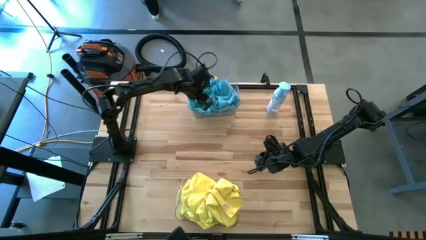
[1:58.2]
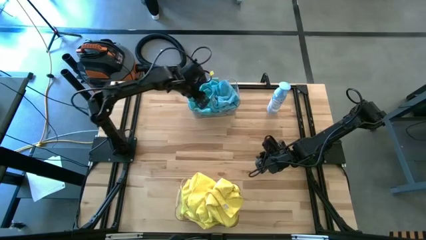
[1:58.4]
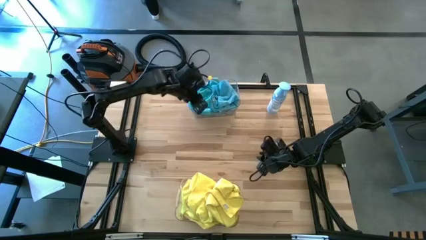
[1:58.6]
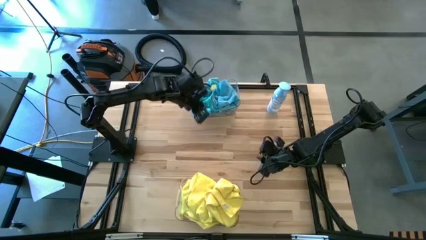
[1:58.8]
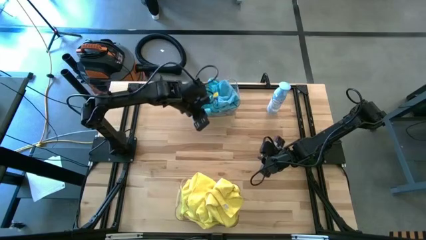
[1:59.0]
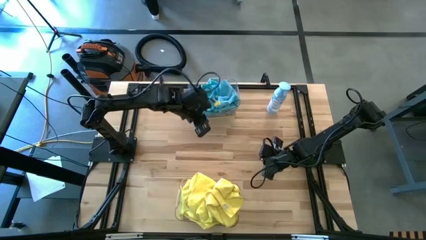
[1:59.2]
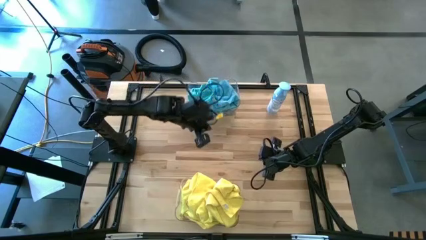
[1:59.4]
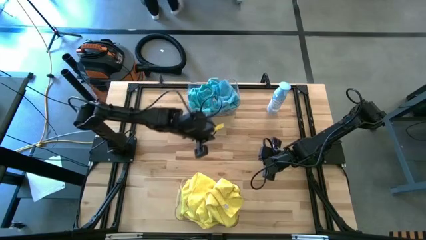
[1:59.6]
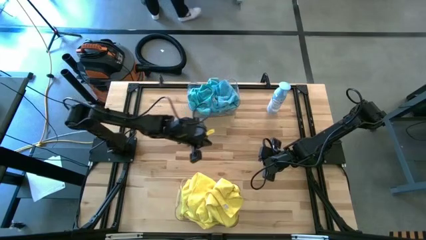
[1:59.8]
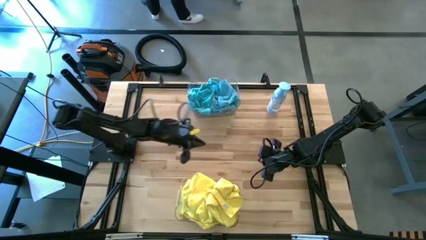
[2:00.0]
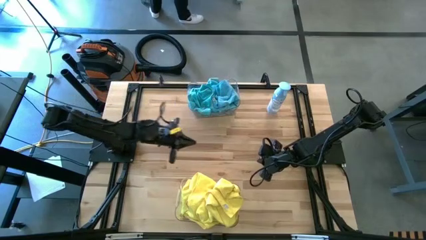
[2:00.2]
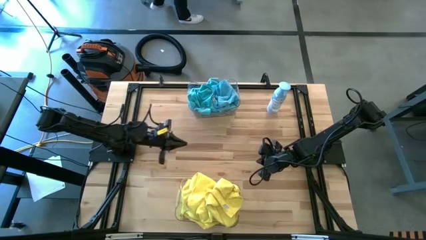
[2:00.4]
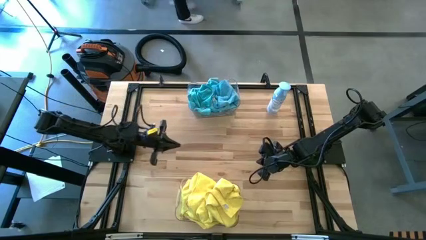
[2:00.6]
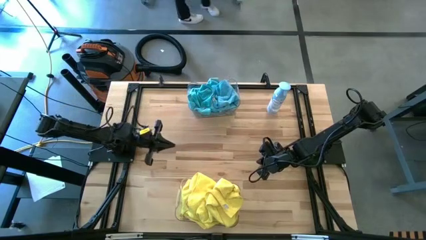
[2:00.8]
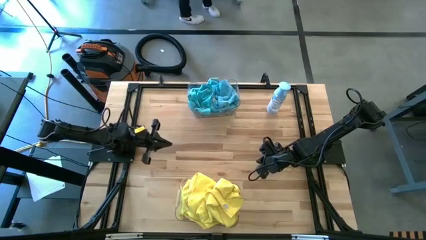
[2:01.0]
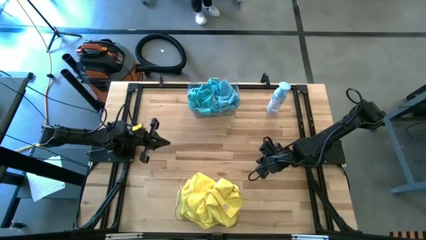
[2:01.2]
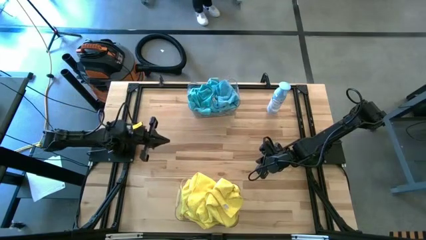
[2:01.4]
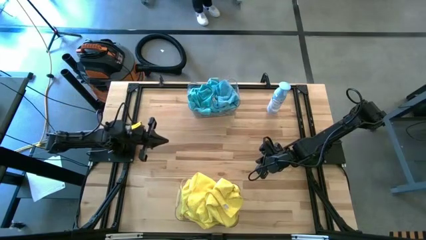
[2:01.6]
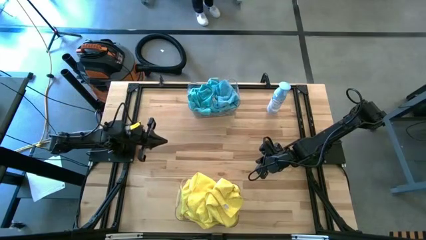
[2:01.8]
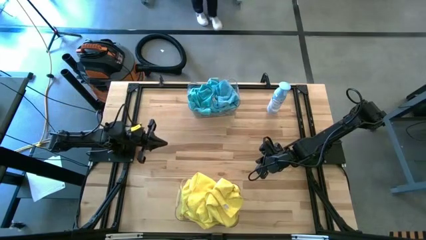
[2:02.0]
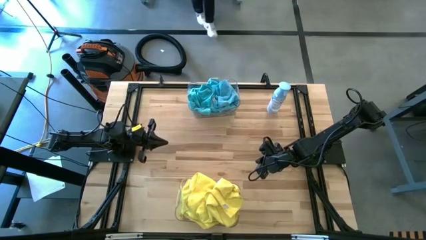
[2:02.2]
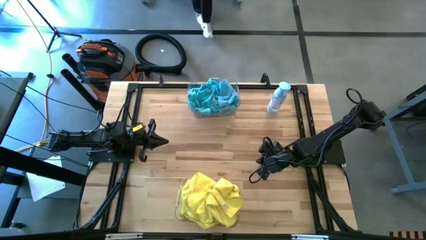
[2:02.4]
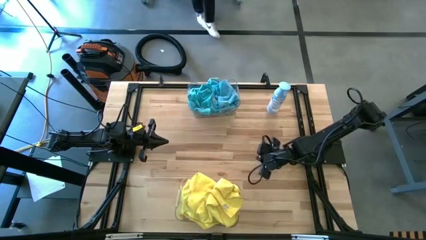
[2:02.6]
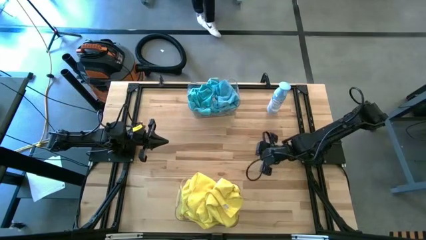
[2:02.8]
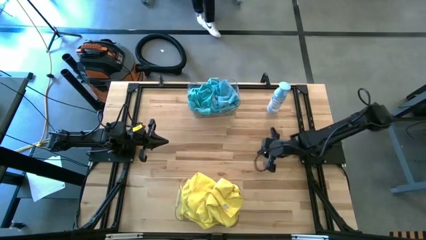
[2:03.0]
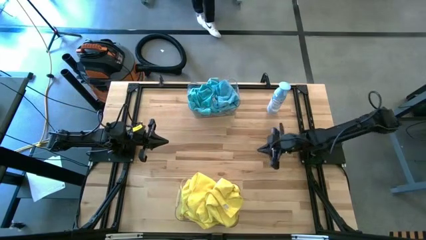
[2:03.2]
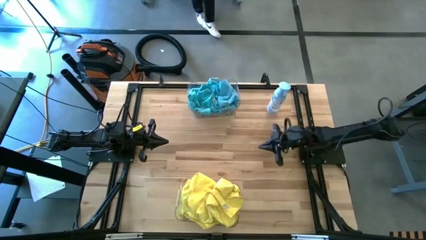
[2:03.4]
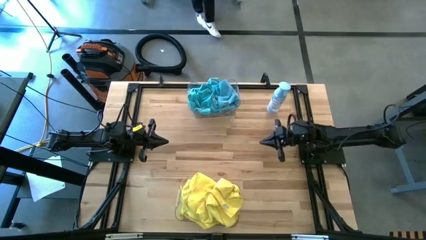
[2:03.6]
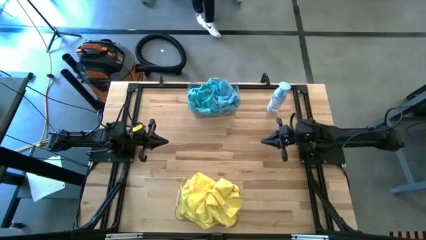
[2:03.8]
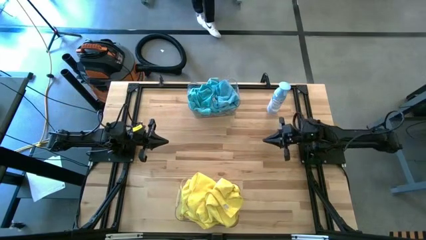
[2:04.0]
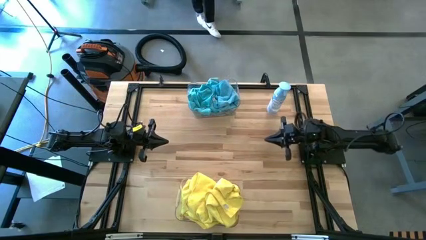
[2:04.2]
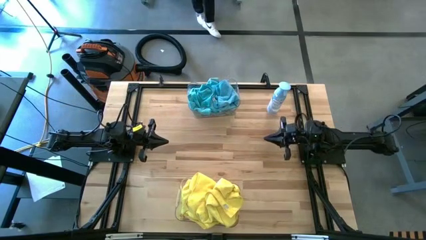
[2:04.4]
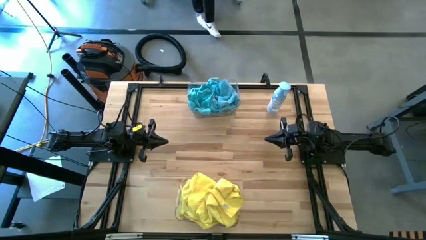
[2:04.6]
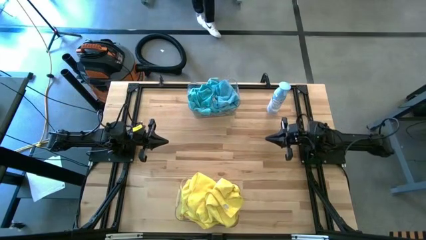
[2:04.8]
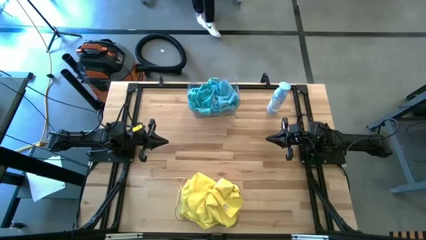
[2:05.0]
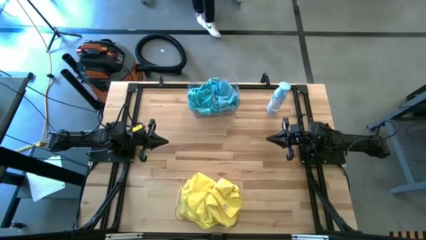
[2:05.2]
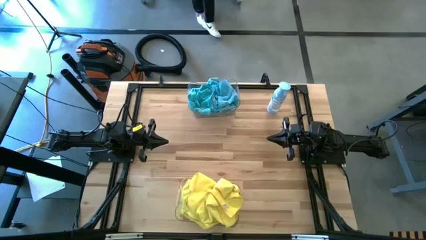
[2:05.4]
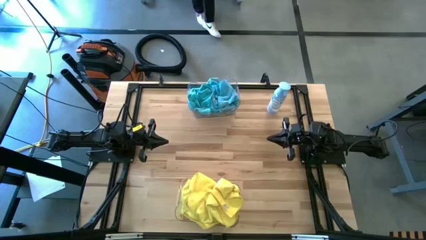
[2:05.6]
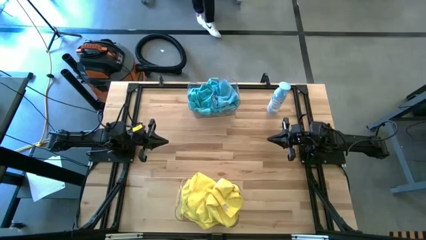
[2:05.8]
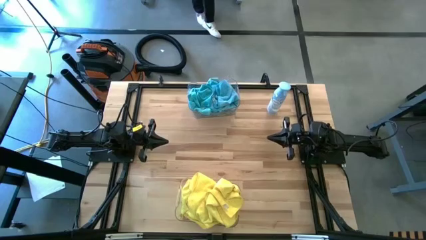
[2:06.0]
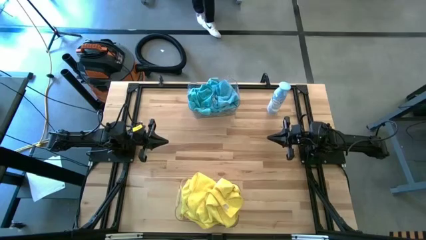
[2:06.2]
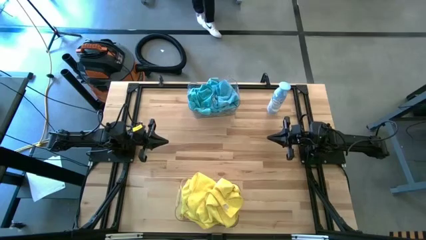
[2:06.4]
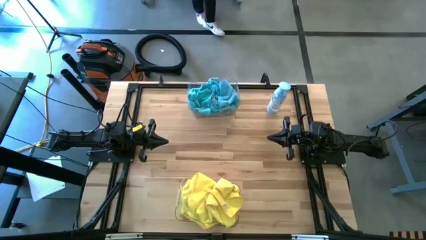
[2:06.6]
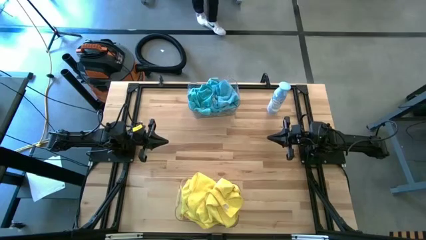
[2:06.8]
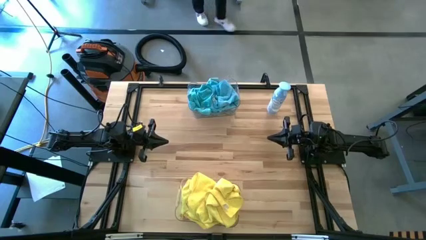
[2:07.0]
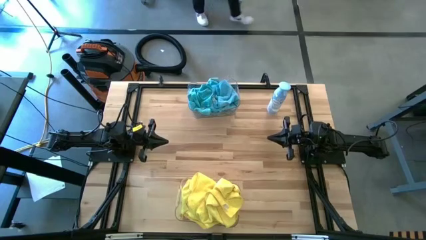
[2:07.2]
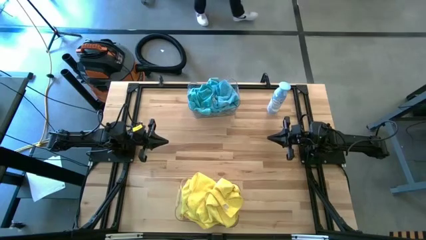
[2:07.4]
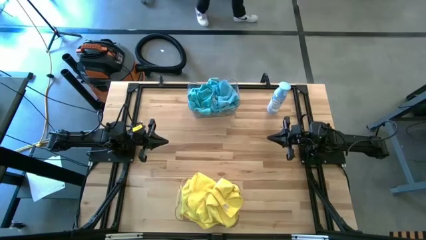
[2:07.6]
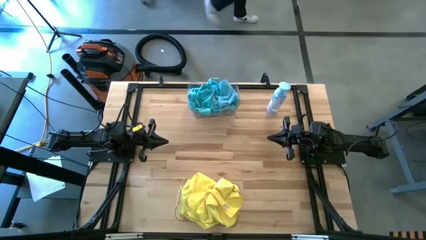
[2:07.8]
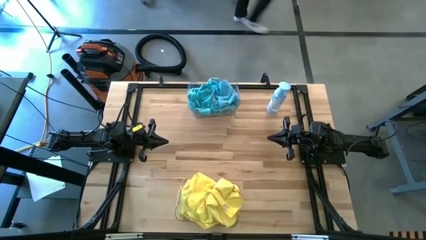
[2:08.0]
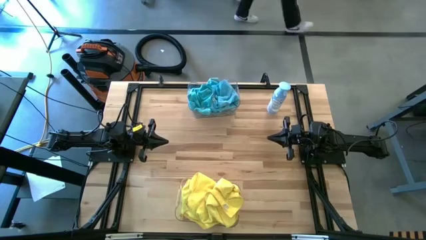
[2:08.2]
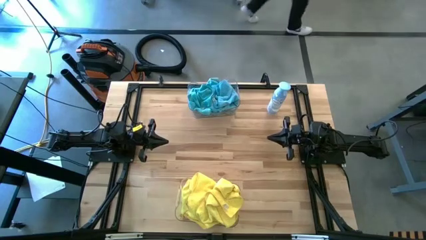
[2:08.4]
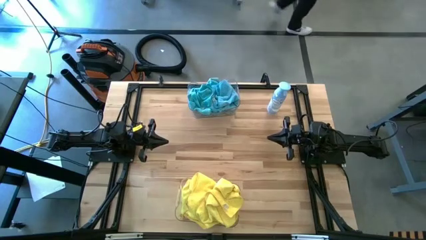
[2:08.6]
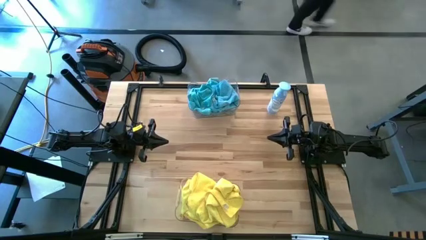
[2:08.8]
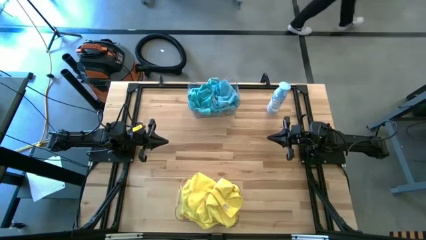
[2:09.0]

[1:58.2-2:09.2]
Task: Sort microfiber towel by color & place in baskets
Return to Home Position

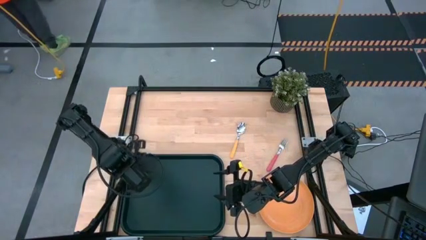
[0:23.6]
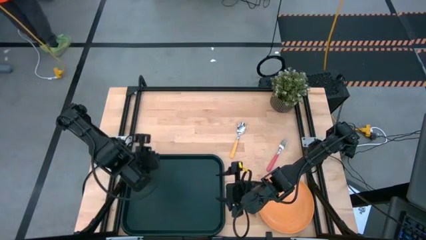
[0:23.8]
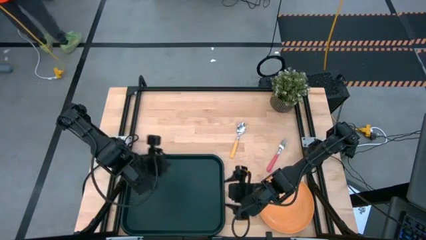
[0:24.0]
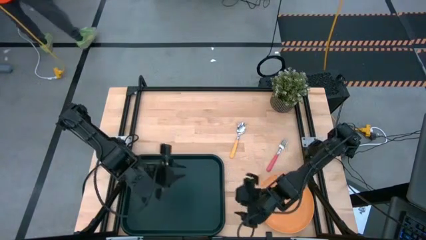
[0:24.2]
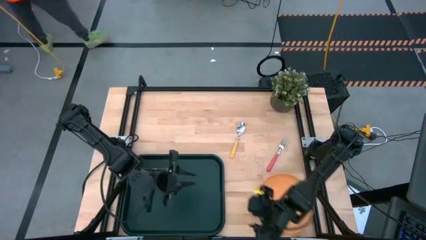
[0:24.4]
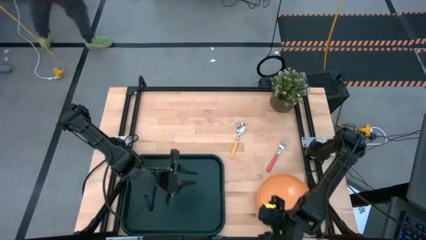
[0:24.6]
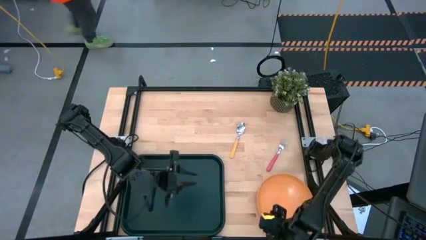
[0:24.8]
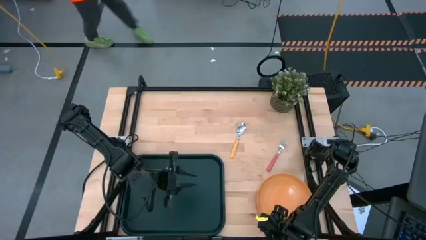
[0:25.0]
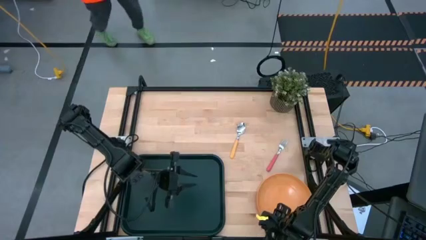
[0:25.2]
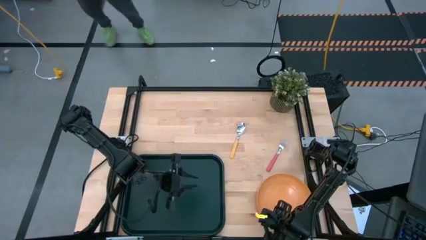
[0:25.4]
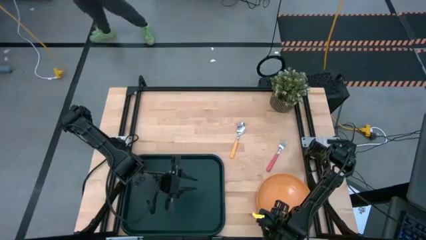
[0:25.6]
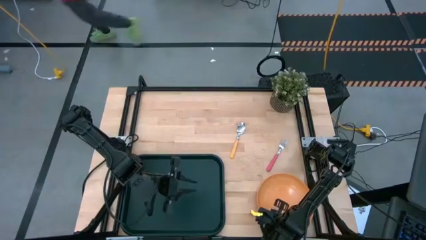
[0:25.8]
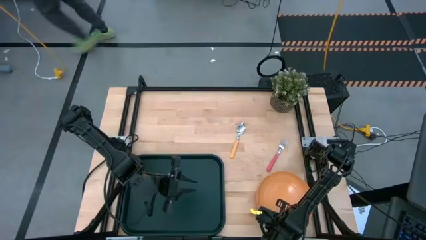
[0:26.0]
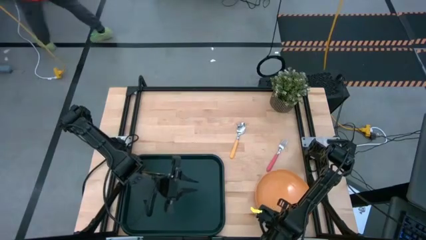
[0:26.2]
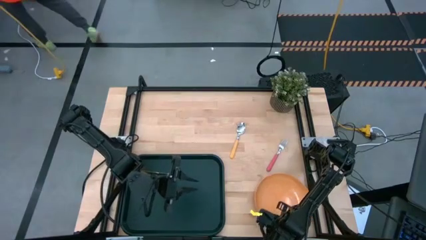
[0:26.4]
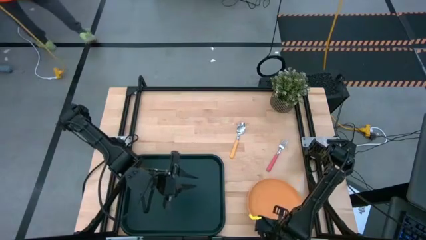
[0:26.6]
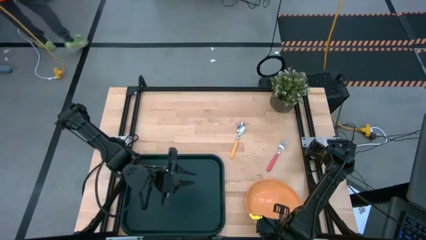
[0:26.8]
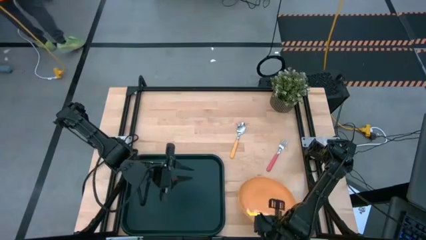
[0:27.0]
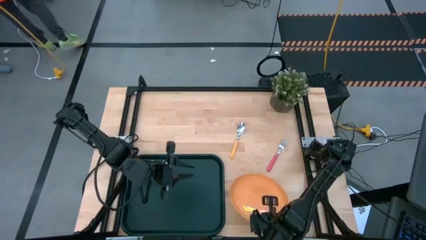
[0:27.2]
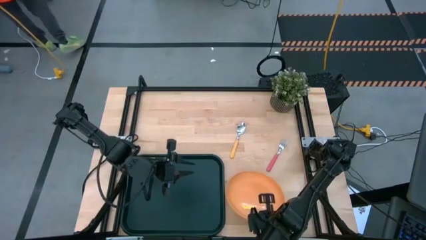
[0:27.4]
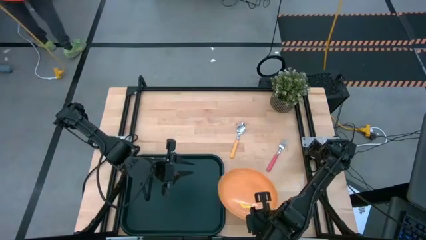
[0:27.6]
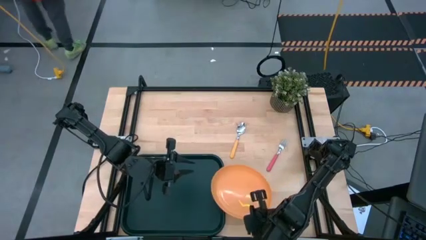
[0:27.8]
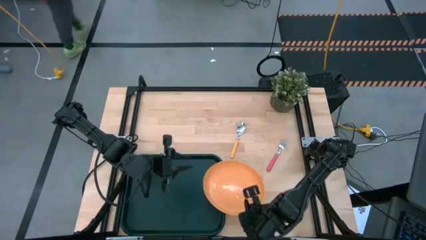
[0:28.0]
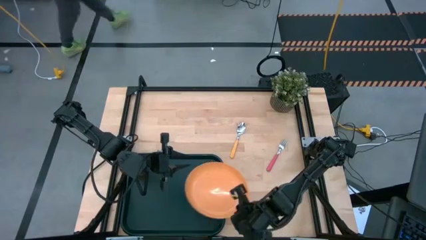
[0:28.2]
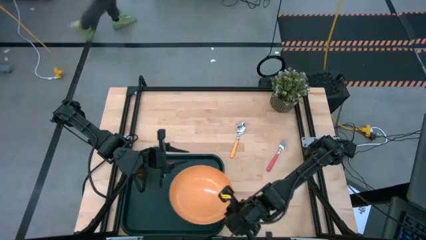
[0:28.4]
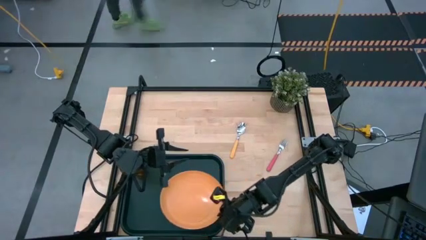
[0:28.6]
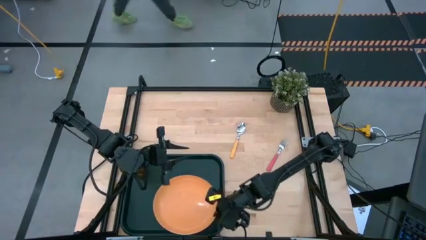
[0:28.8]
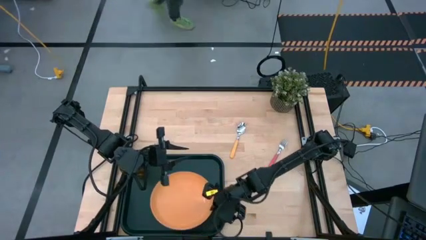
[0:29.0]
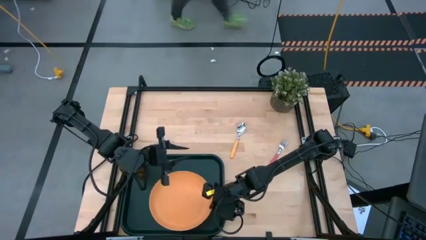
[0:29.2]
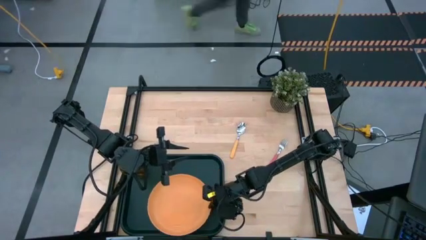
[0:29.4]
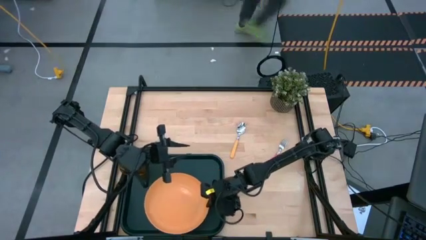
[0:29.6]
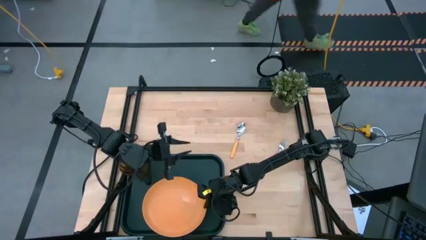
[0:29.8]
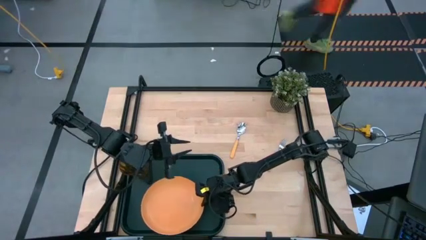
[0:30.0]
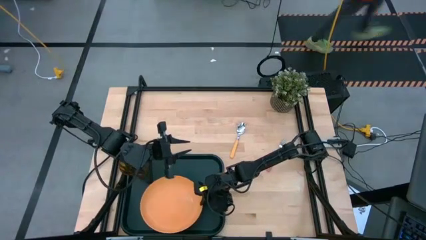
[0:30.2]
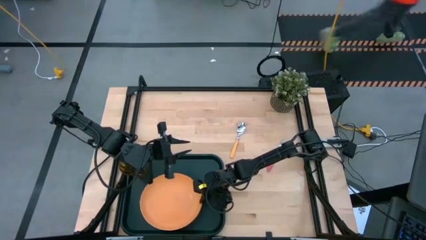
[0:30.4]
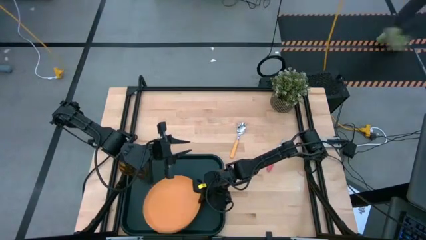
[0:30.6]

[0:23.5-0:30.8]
Task: Pick and place plate/cup/fork/spoon on tray
Put the orange plate on the black tray to the right of the orange cup
